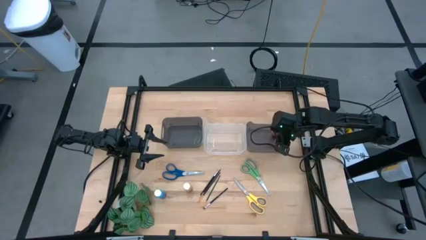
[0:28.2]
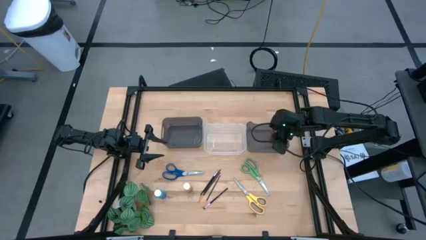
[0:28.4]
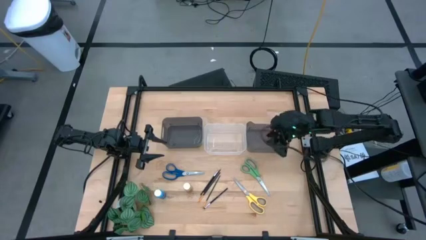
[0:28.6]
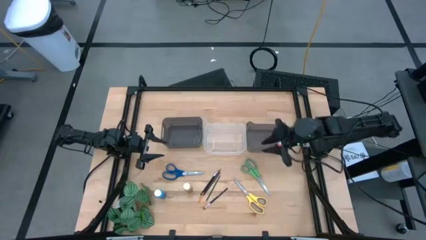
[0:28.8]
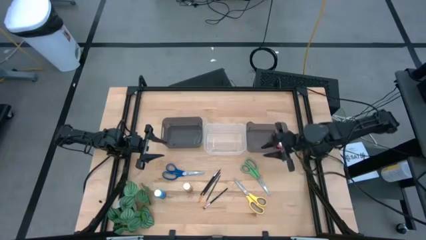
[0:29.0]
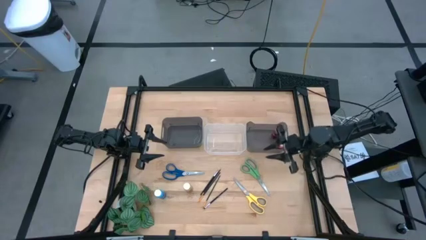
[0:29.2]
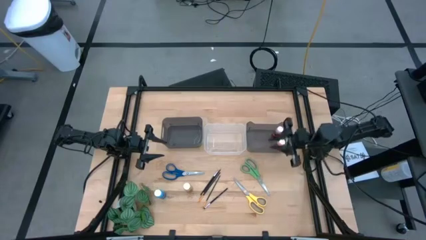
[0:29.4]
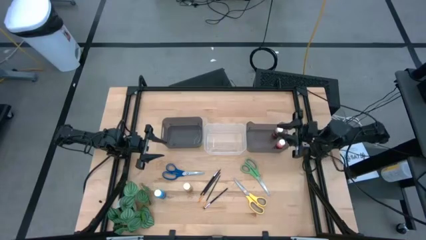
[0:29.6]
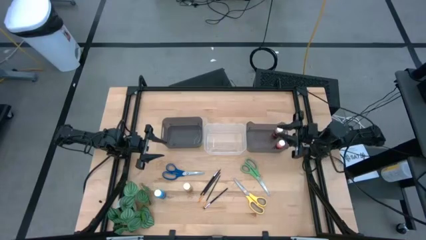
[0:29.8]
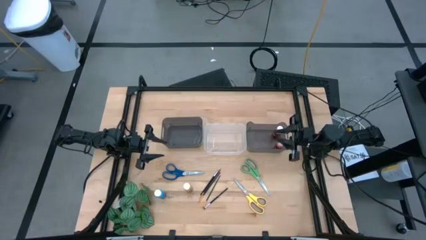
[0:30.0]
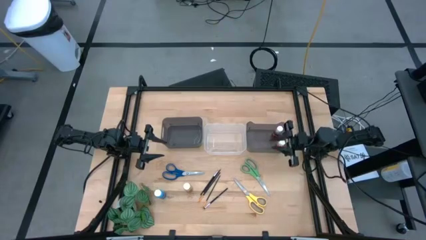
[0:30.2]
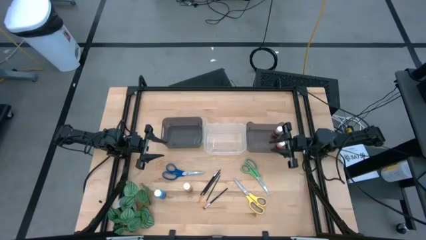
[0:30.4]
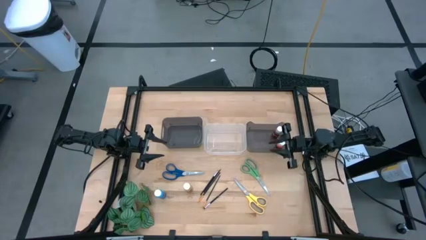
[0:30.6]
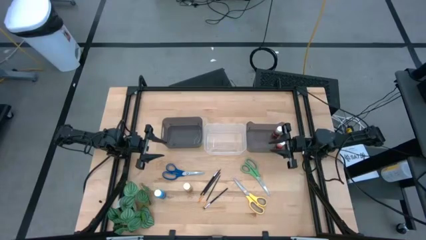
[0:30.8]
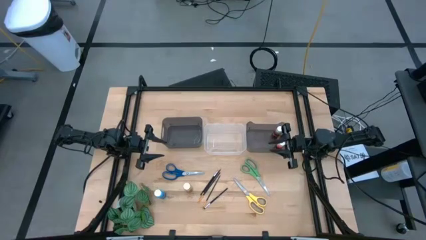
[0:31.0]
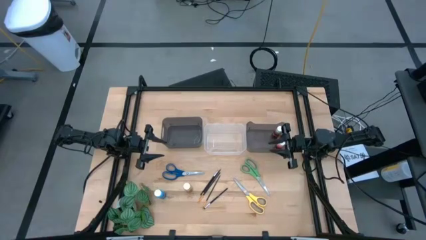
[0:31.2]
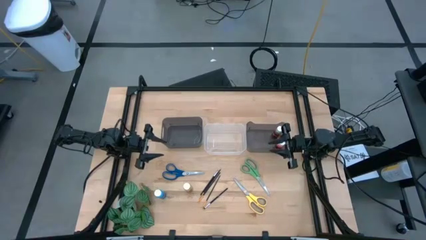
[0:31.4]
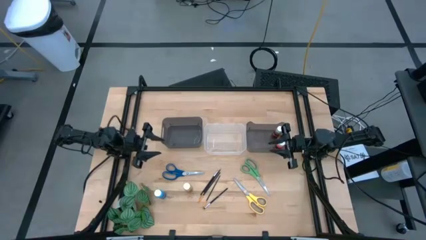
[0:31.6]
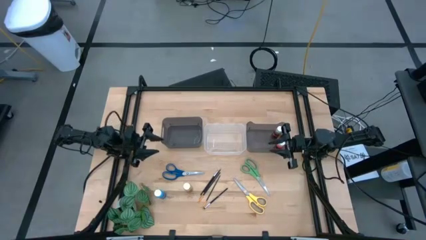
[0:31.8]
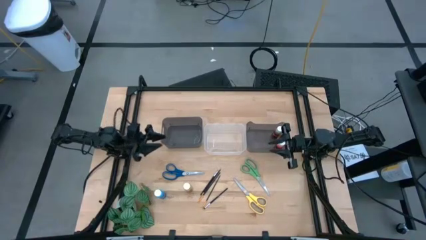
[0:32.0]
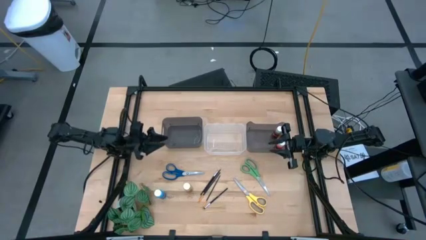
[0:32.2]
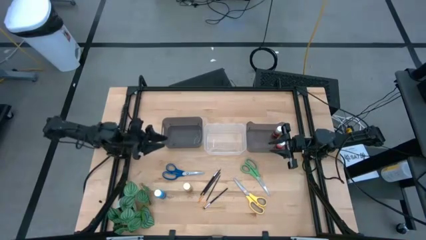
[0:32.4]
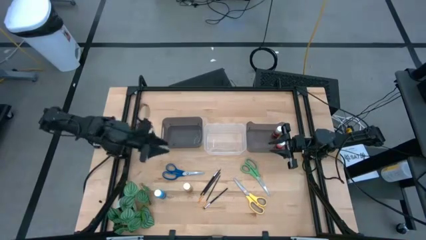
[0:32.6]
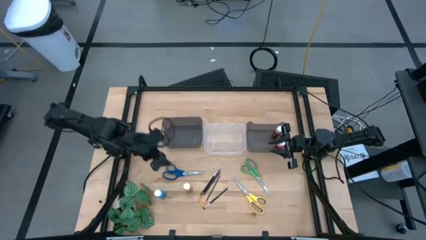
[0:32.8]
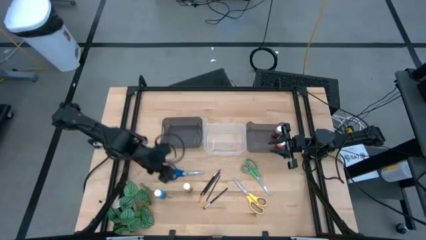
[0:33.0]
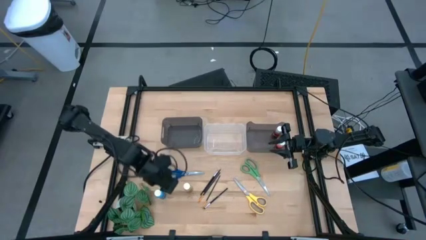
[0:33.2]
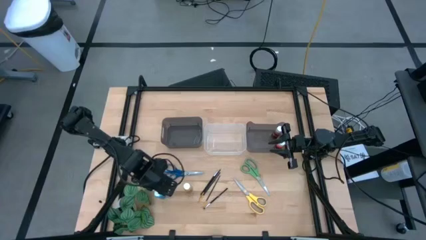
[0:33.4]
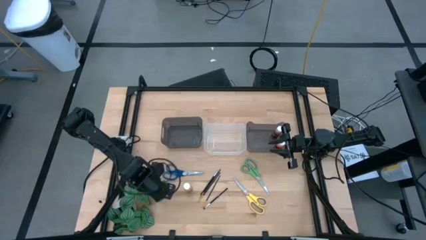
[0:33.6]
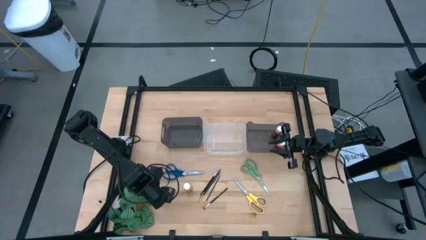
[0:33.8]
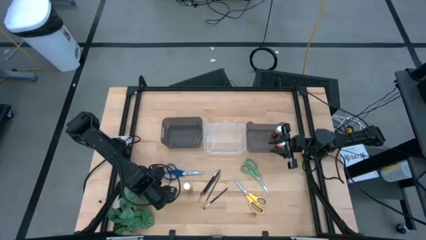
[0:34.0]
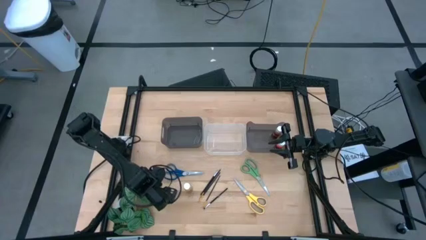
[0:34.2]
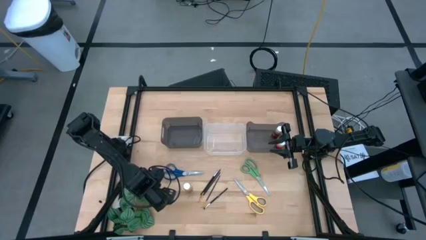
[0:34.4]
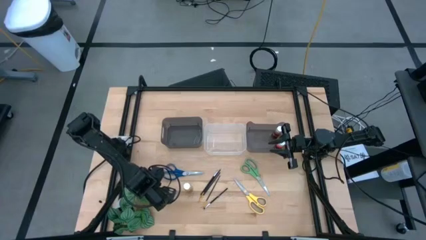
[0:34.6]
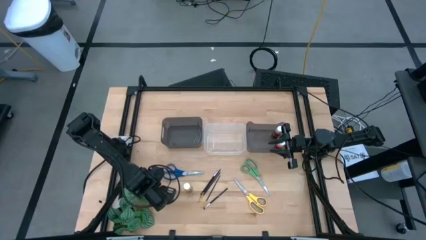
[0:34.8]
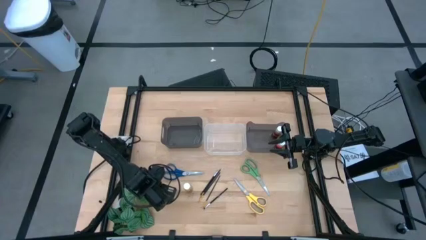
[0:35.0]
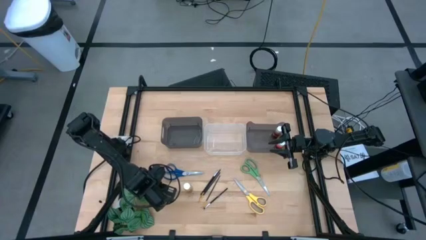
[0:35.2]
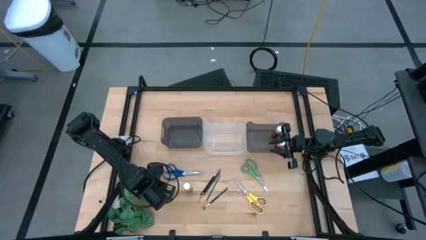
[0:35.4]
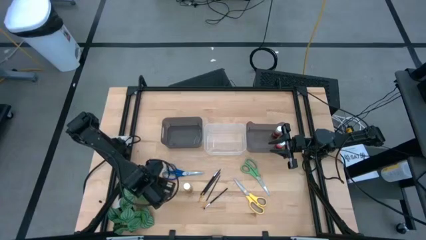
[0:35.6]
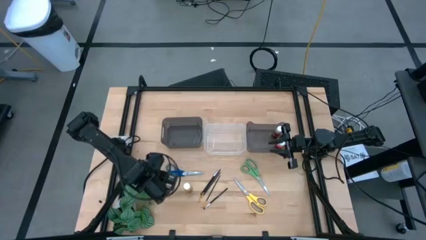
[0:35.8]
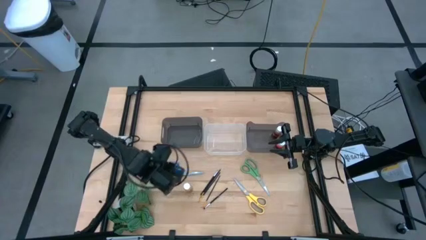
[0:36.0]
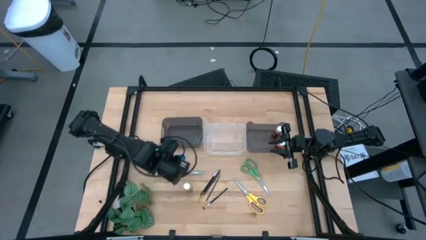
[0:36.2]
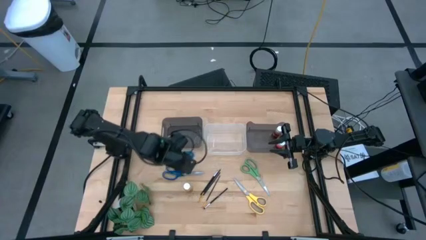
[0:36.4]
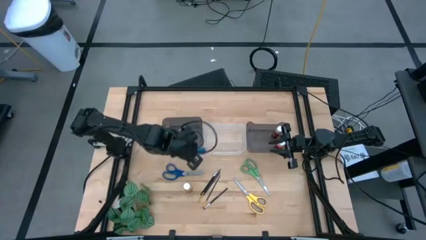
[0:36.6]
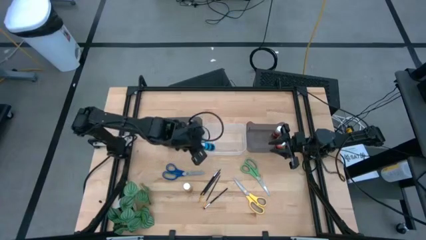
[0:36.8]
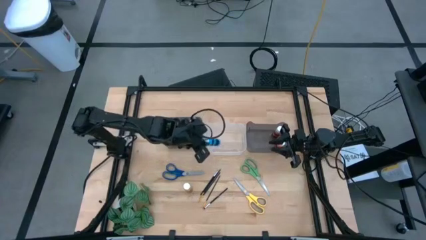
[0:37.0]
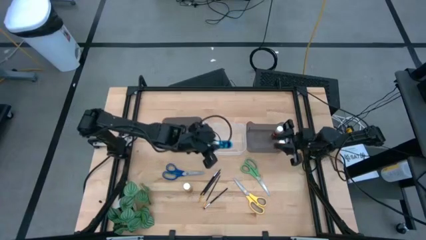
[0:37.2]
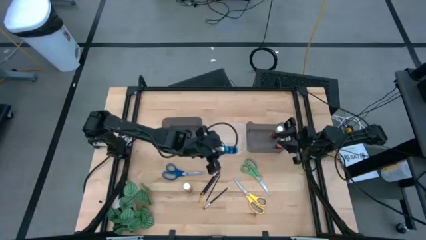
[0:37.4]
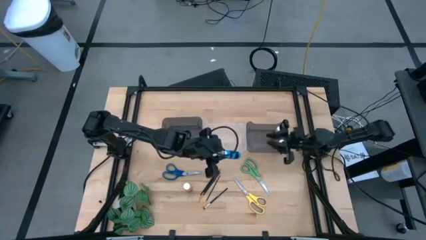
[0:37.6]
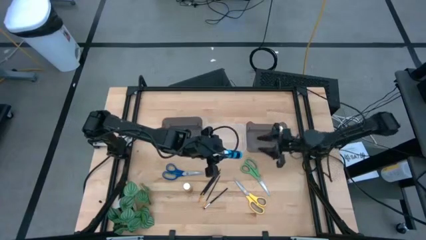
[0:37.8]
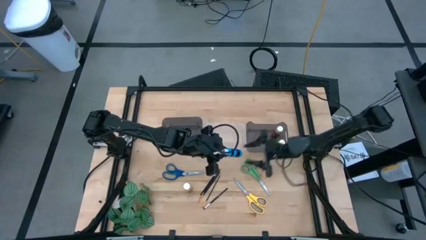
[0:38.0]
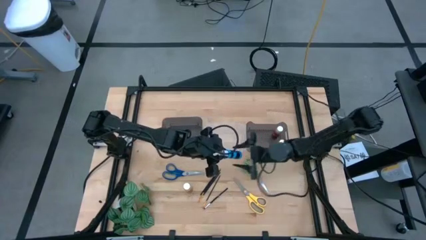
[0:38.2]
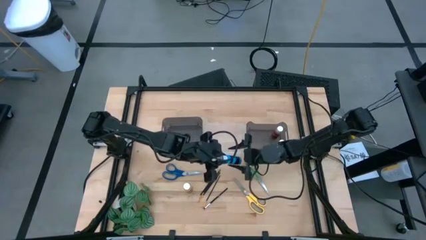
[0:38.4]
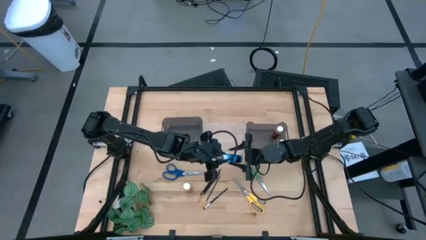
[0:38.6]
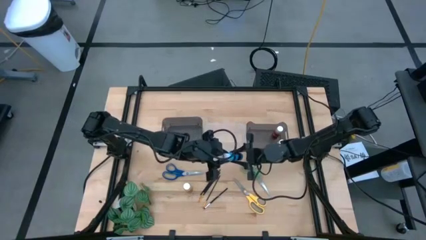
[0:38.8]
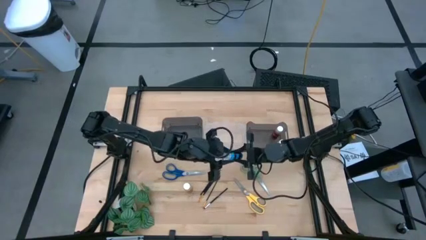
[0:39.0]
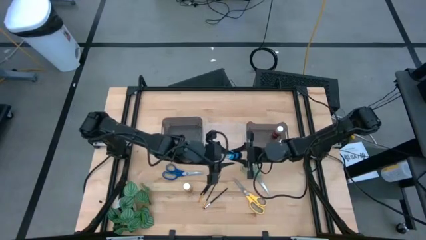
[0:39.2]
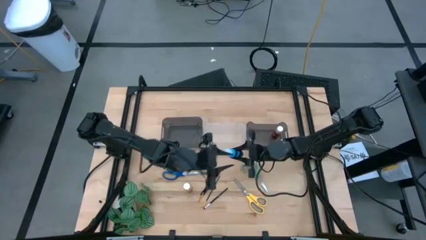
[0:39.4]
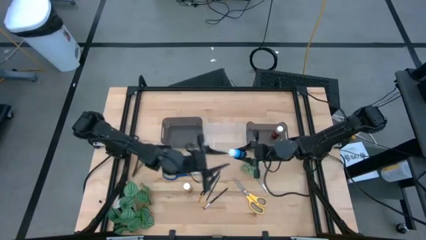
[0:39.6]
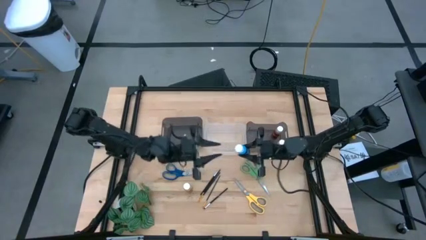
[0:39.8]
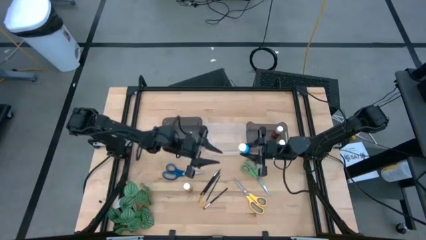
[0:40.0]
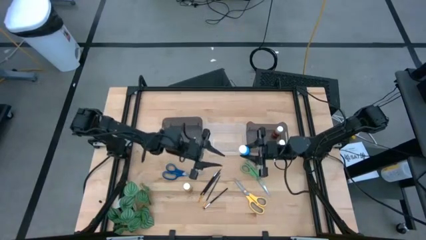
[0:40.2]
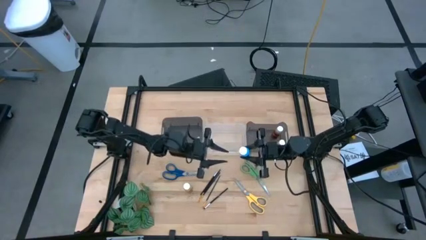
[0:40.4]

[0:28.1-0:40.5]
Task: Pick & Place Paint Supplies
Put the blue paint bottle into the right black bin
